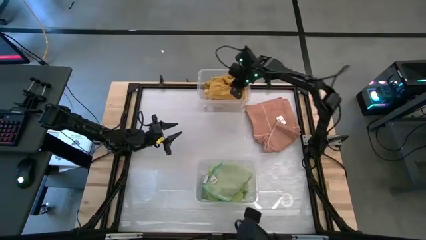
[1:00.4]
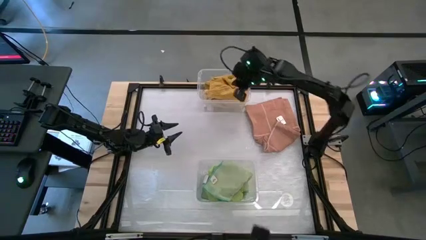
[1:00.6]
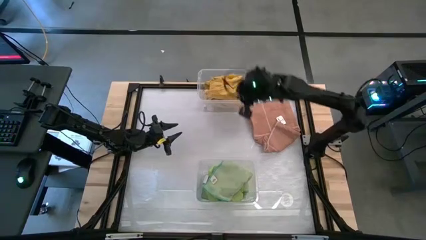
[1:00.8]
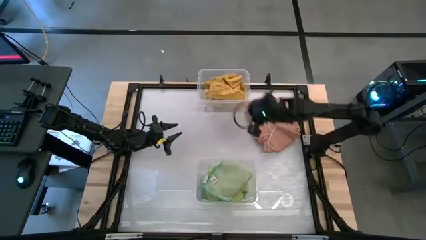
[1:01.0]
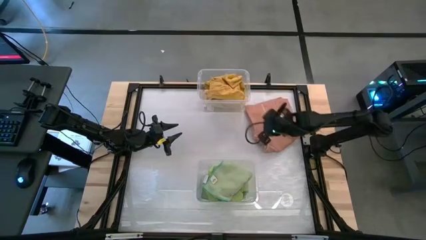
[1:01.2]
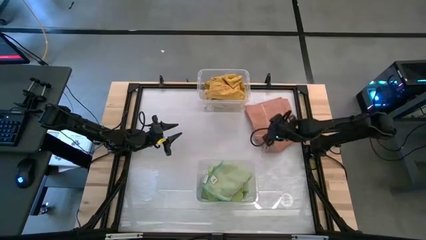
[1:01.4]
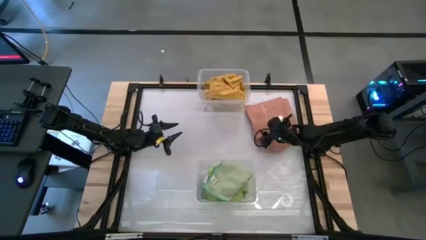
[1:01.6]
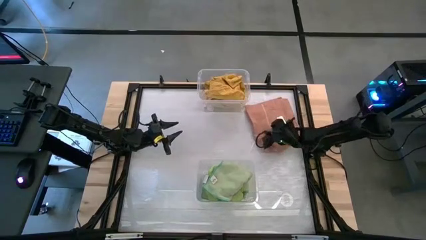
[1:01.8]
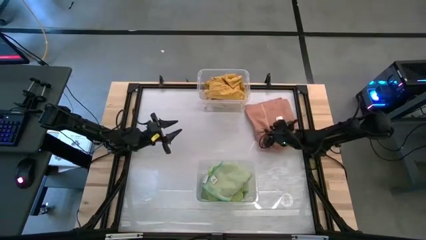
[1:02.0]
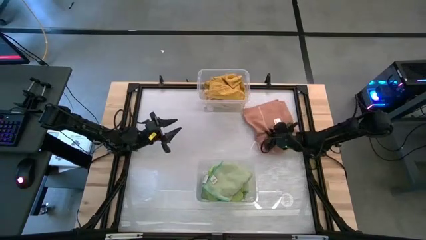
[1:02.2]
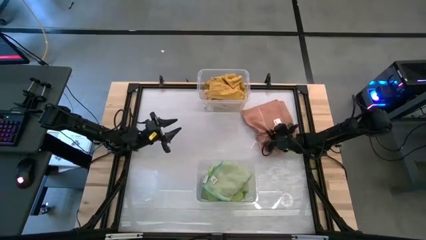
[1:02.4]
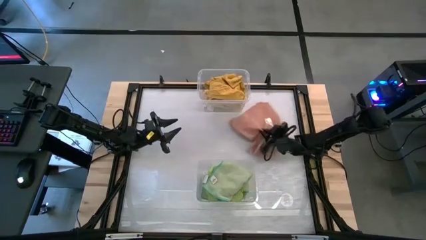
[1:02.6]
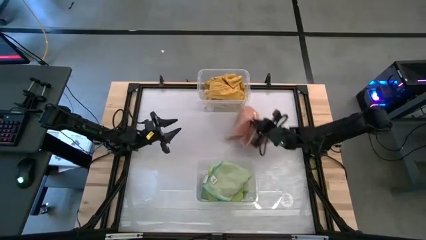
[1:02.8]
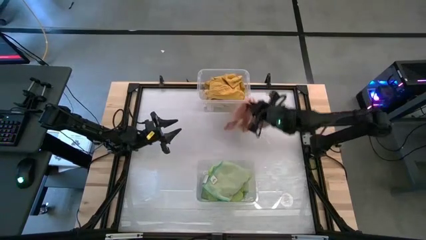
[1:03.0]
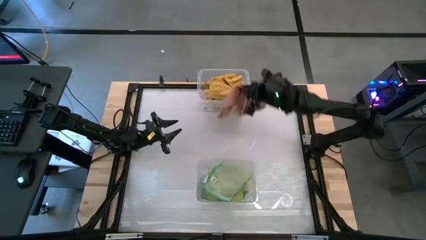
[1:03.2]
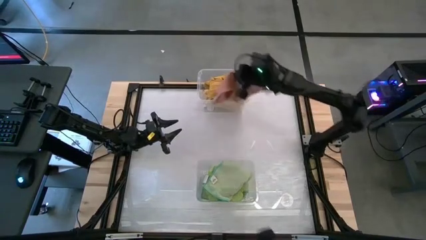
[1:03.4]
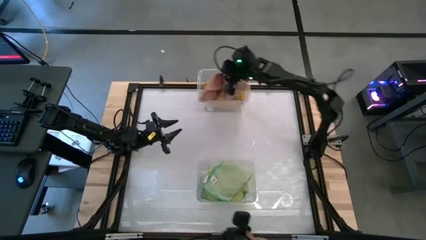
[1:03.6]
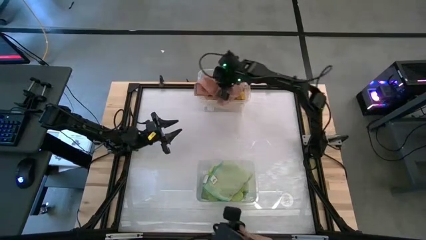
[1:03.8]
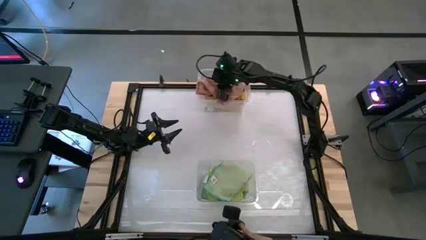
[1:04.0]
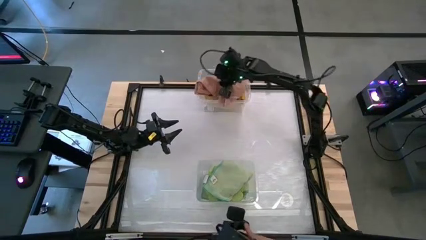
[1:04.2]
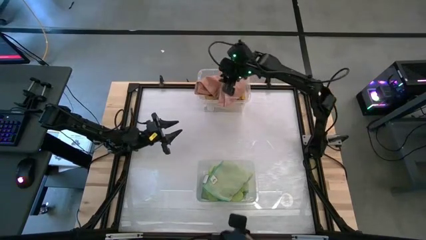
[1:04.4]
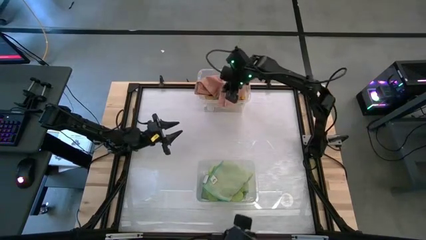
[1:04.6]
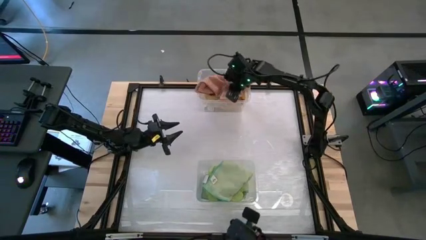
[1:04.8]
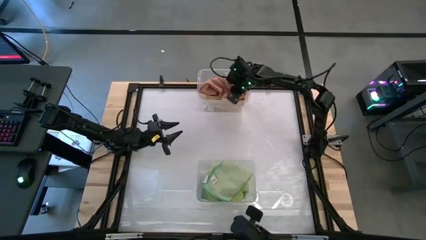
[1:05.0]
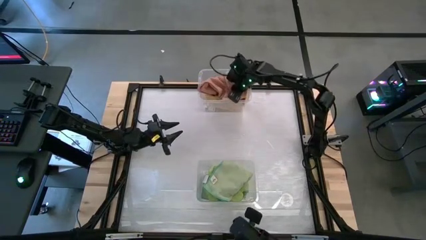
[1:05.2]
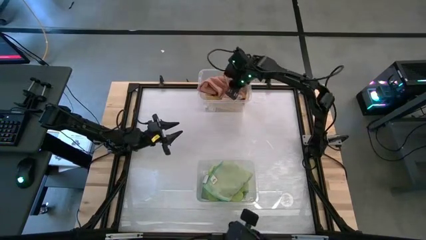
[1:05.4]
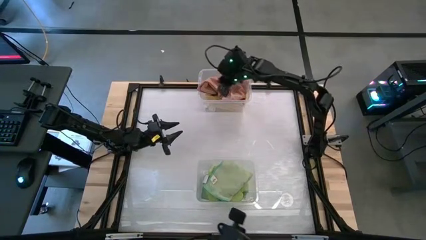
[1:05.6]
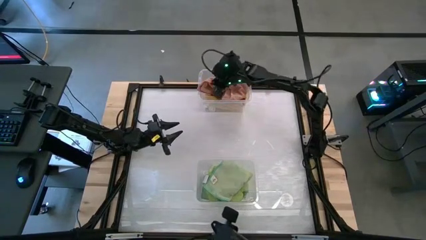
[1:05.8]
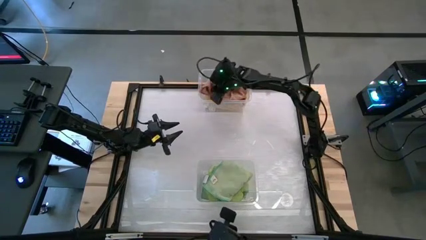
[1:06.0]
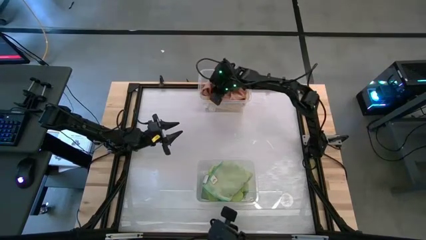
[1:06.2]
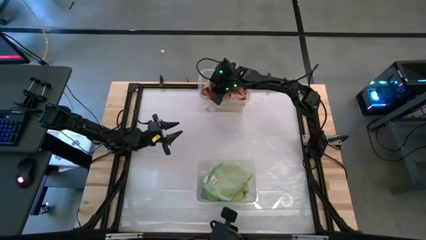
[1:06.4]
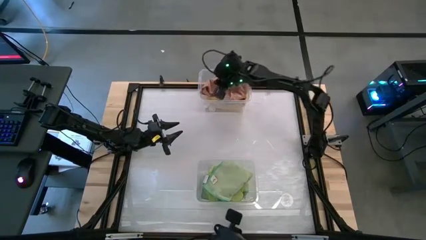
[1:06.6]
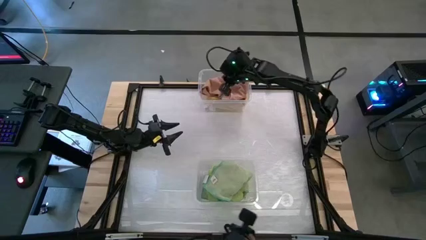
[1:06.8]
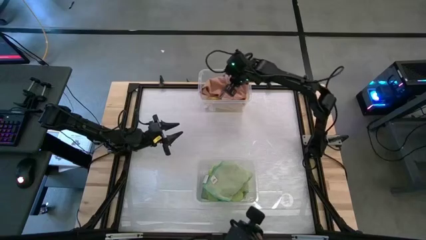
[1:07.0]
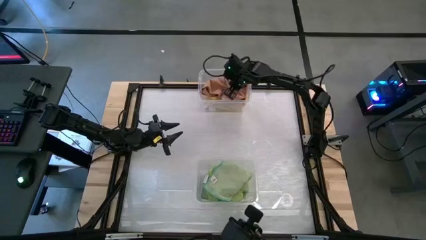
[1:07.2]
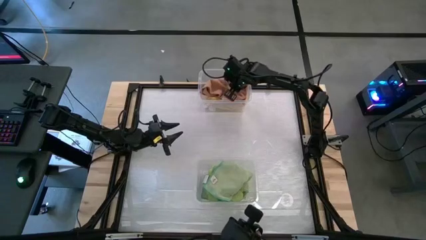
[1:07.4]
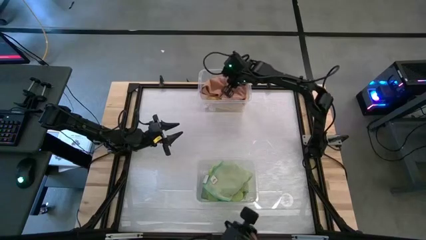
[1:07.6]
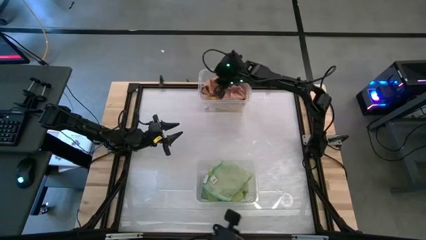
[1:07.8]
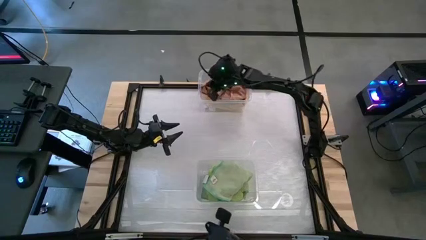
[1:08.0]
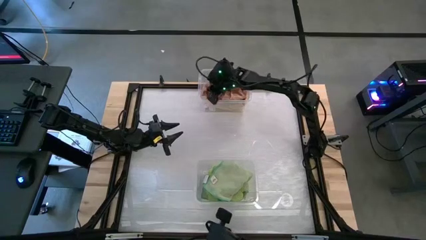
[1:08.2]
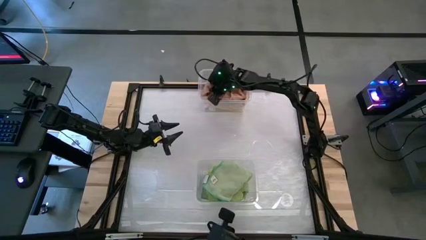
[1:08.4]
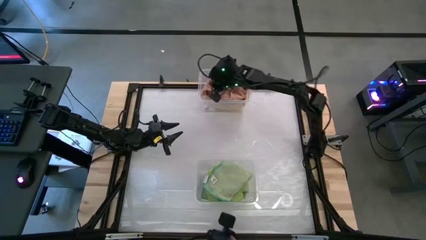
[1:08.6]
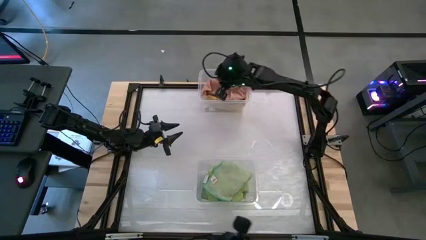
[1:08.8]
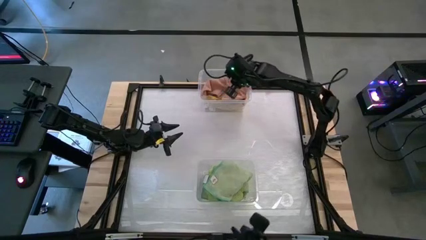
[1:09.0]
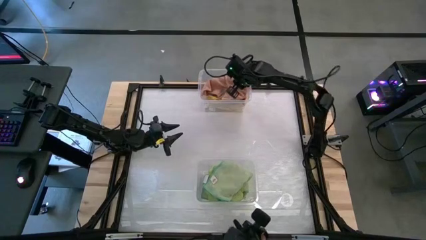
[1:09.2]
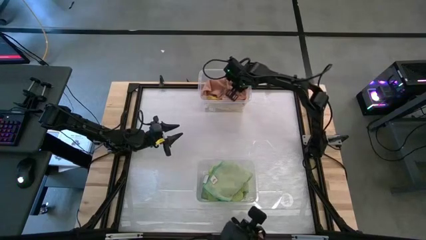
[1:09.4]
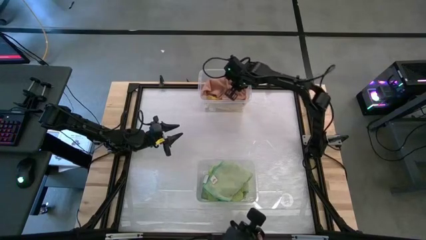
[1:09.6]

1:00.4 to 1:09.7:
Task: Sort towels by color in basket
Put the brown towel into the top transparent bin

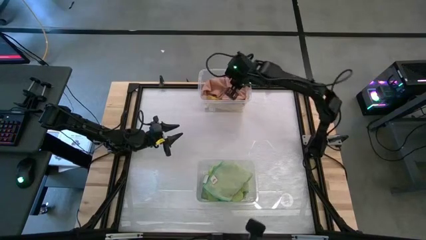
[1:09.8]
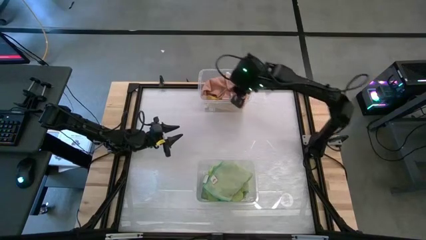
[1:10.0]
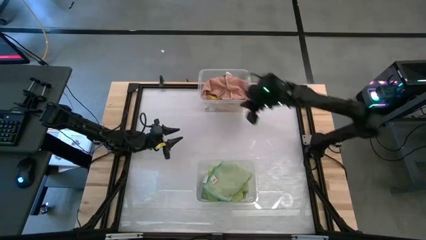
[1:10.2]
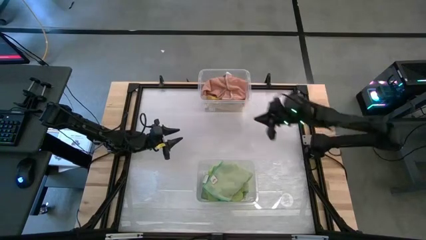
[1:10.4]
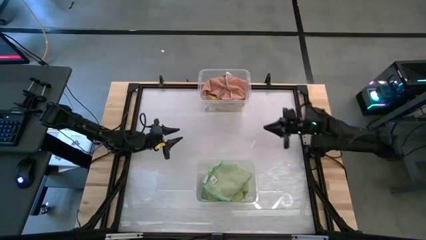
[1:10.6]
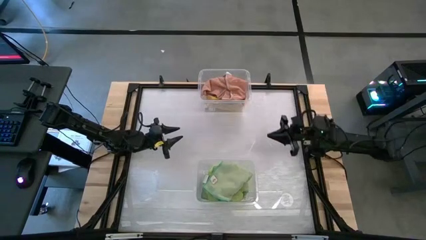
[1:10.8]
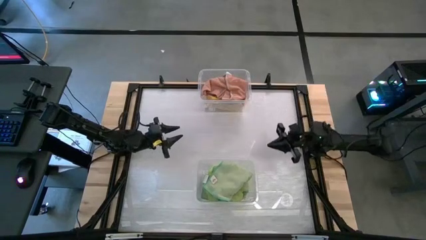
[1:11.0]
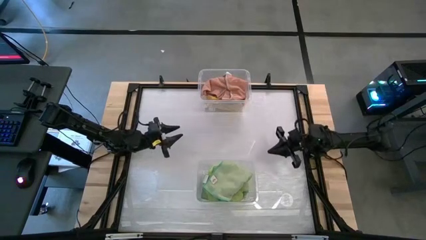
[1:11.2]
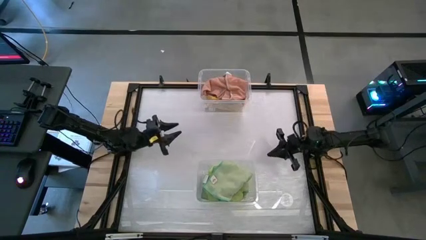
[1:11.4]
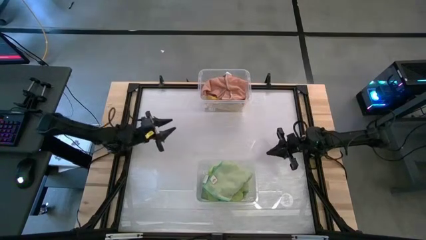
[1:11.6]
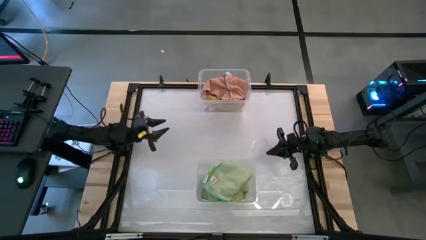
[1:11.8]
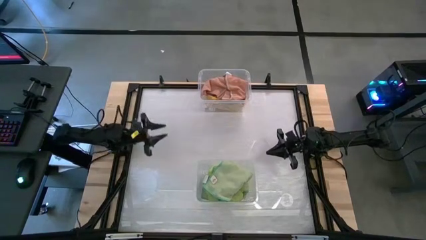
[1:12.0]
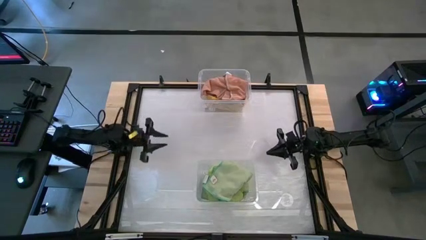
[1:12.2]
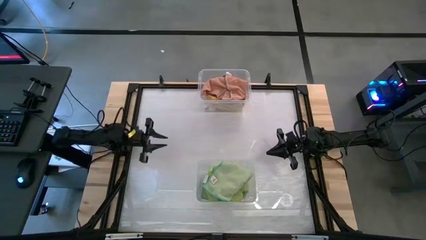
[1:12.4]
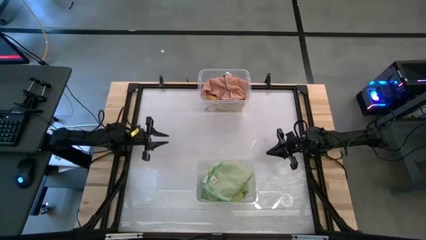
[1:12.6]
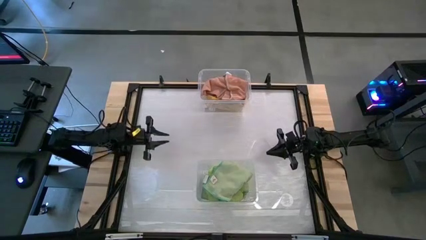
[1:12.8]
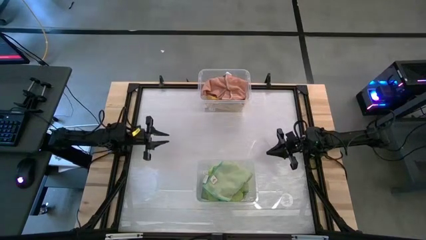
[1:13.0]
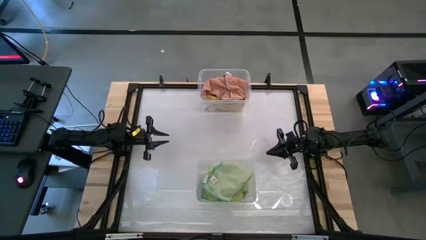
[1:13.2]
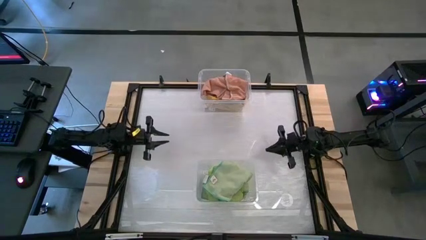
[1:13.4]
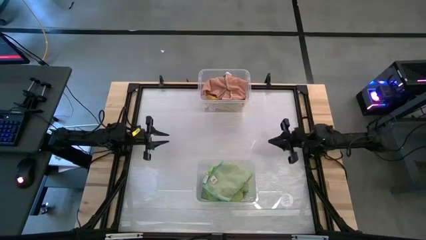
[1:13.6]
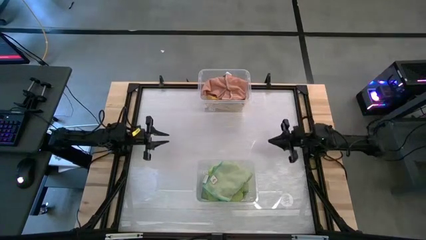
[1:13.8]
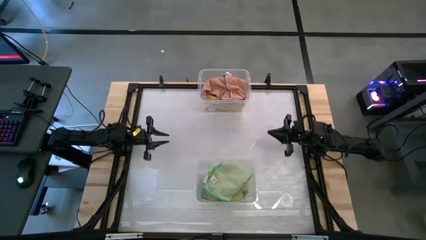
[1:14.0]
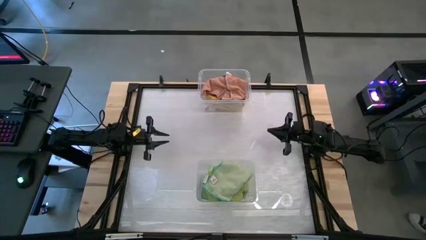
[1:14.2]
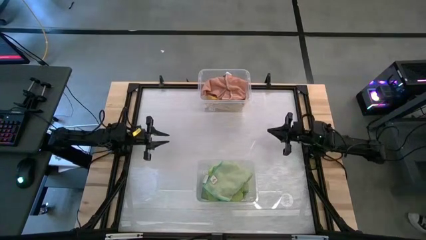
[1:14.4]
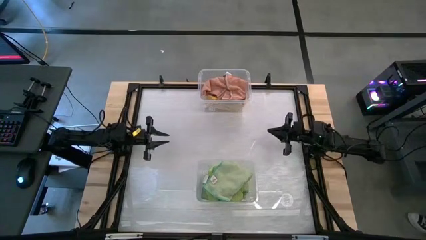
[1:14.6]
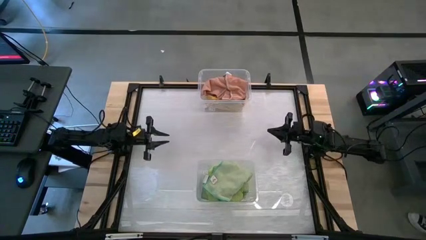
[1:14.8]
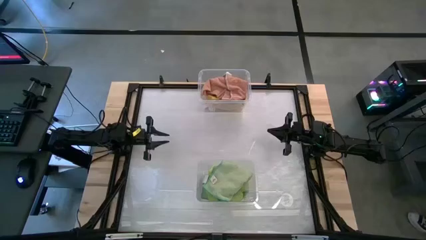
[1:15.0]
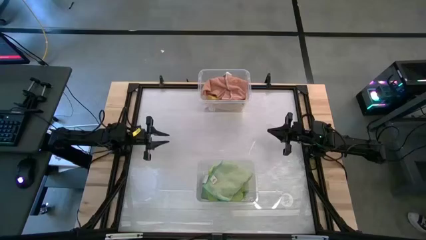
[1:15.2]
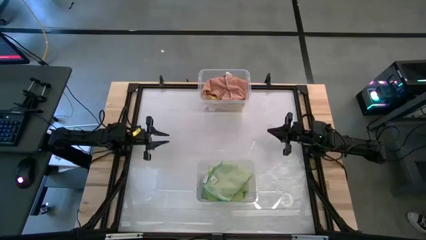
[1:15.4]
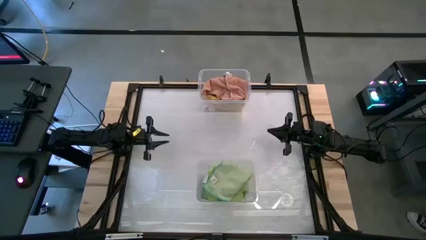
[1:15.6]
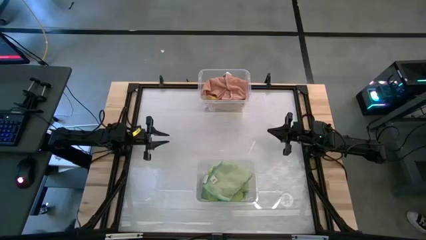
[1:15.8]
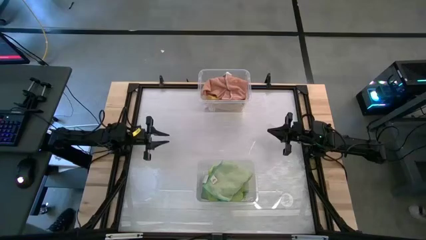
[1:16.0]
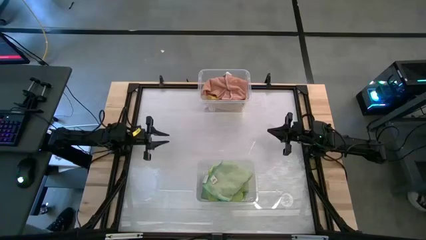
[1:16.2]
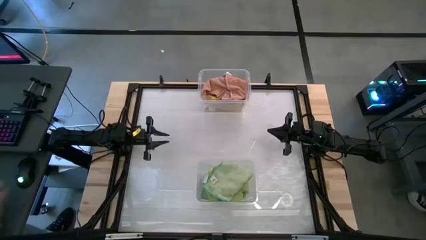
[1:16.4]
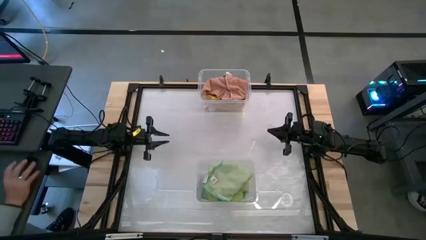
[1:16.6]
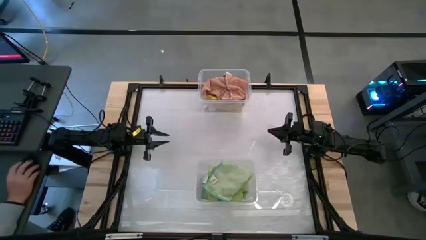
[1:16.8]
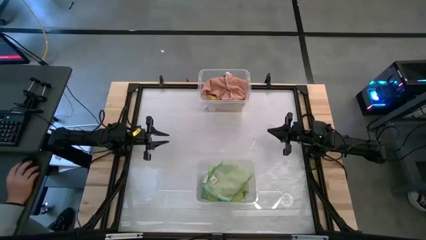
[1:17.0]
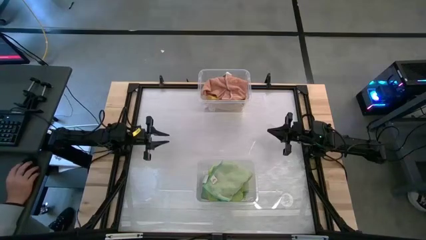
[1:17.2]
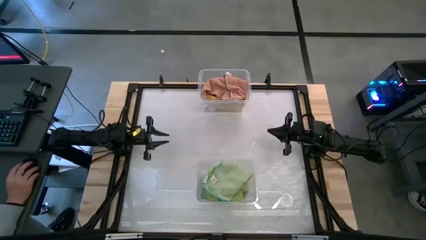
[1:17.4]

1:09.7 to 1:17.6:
Return to Home Position
